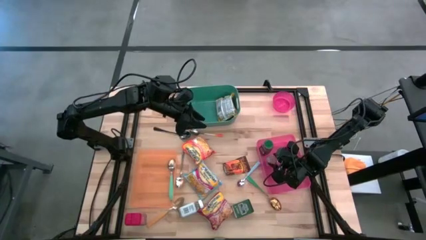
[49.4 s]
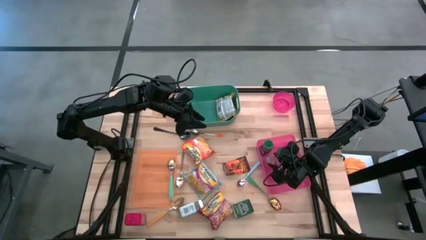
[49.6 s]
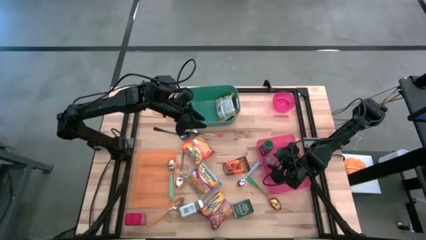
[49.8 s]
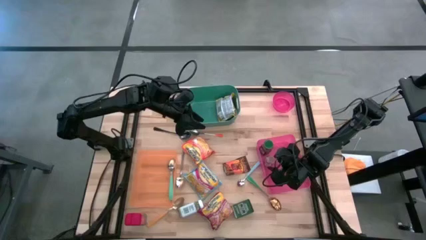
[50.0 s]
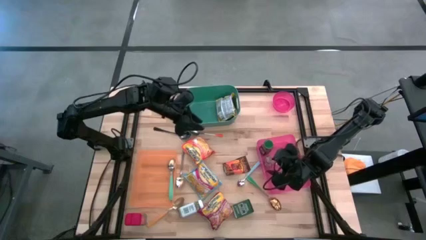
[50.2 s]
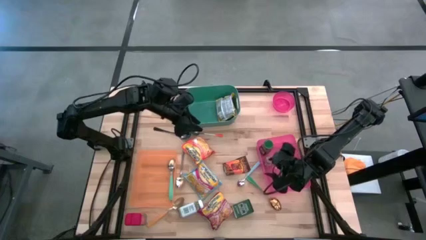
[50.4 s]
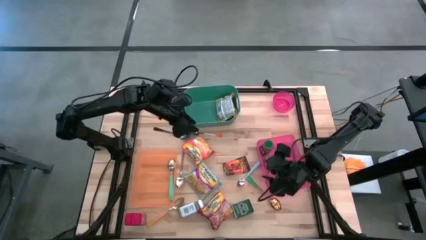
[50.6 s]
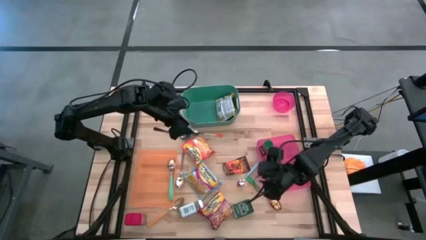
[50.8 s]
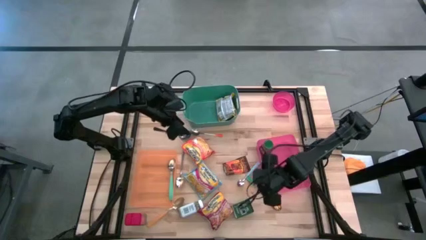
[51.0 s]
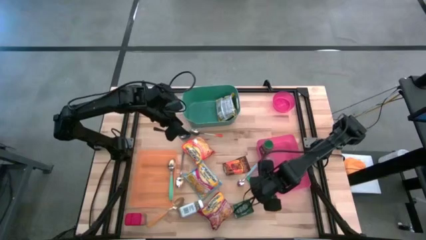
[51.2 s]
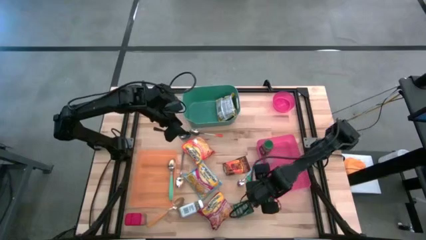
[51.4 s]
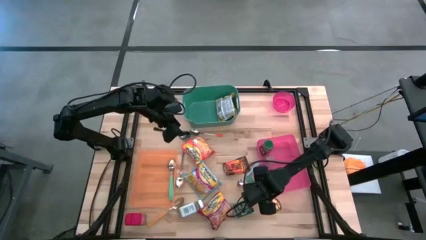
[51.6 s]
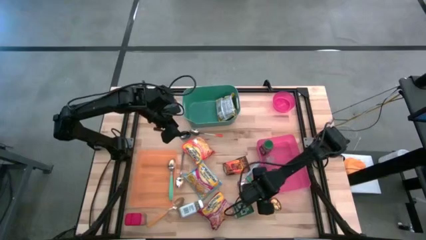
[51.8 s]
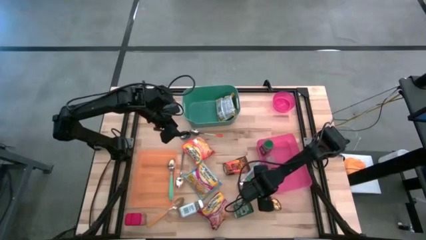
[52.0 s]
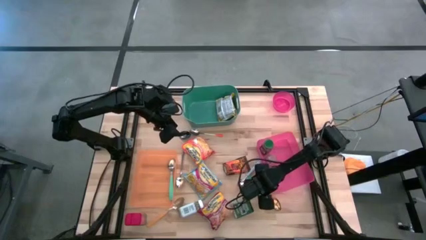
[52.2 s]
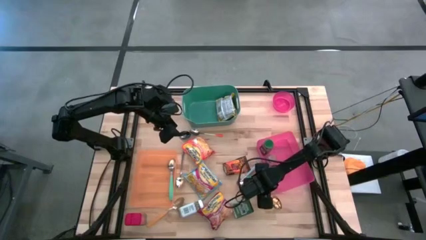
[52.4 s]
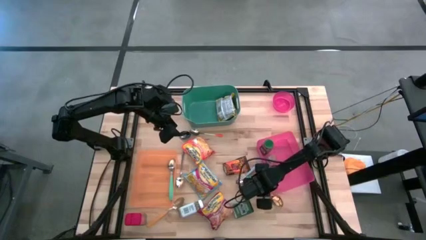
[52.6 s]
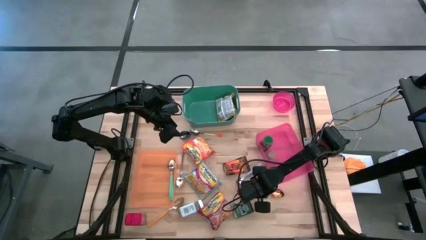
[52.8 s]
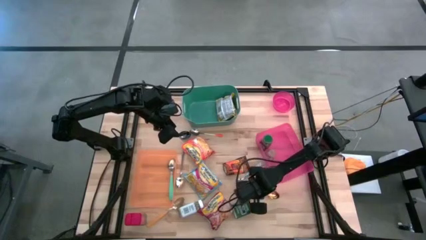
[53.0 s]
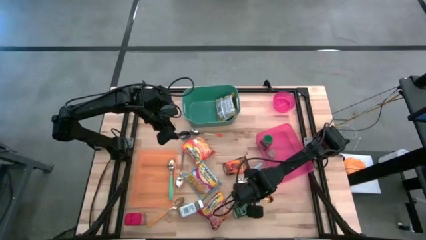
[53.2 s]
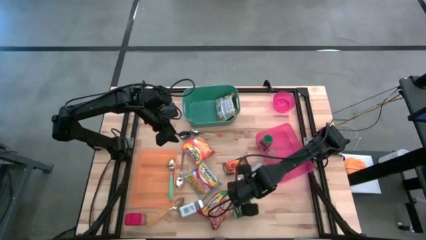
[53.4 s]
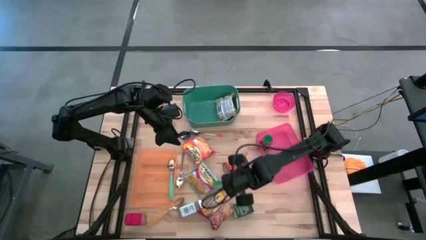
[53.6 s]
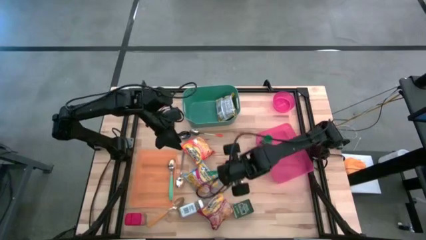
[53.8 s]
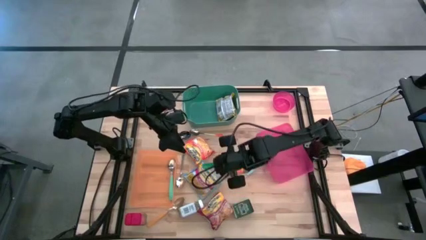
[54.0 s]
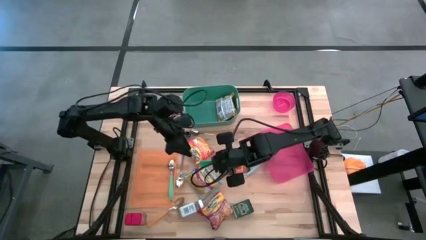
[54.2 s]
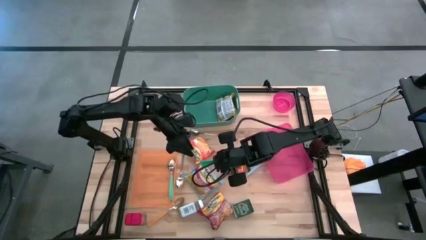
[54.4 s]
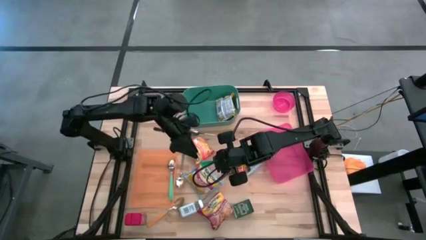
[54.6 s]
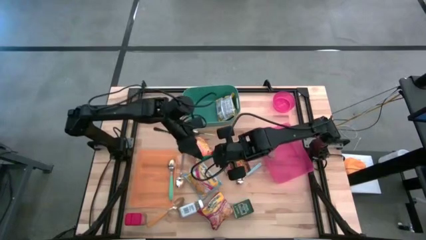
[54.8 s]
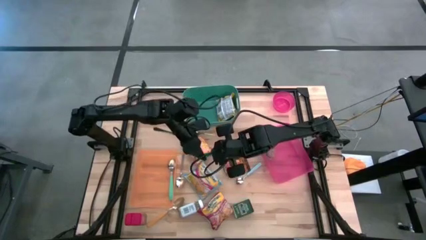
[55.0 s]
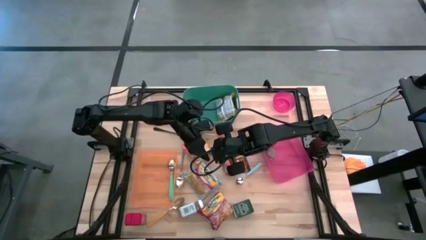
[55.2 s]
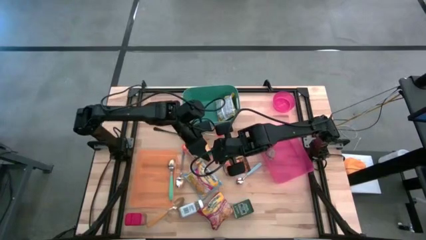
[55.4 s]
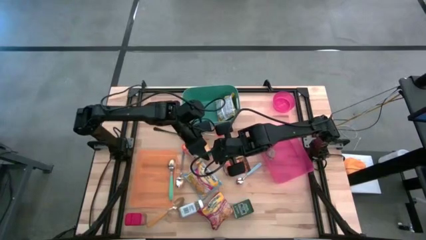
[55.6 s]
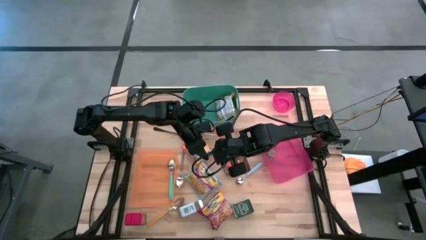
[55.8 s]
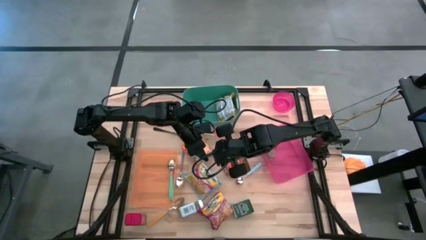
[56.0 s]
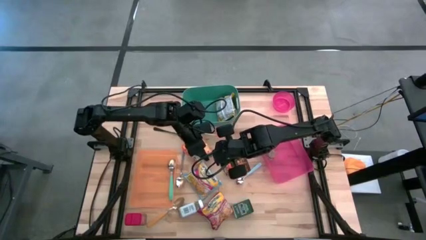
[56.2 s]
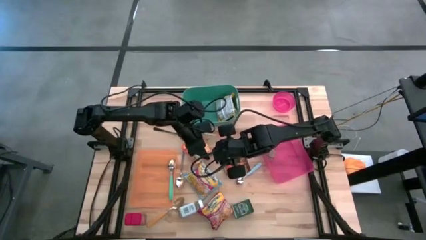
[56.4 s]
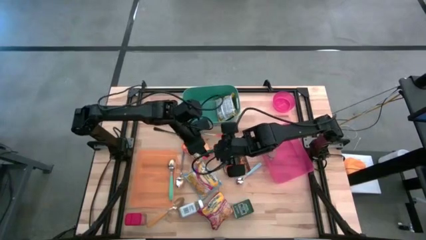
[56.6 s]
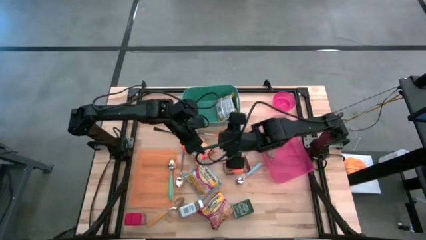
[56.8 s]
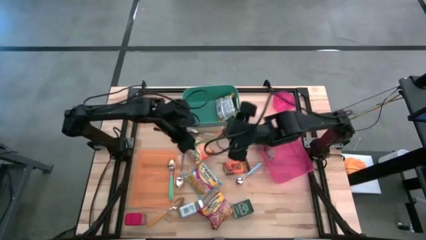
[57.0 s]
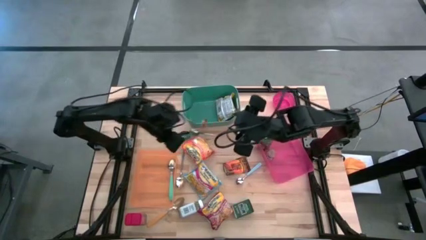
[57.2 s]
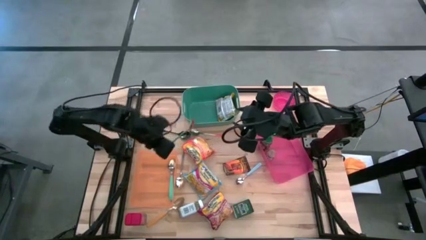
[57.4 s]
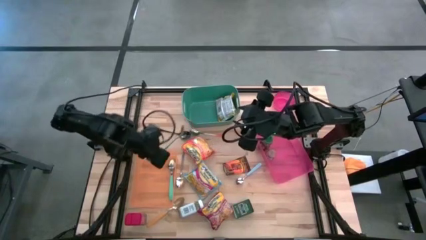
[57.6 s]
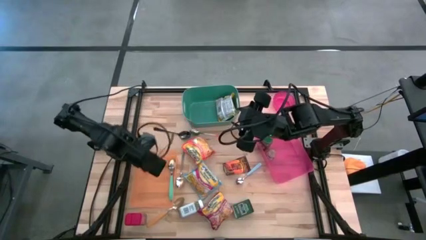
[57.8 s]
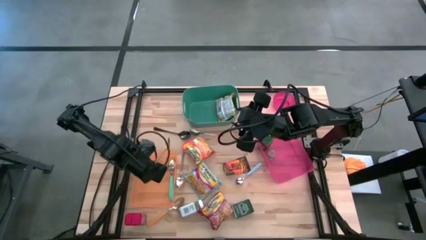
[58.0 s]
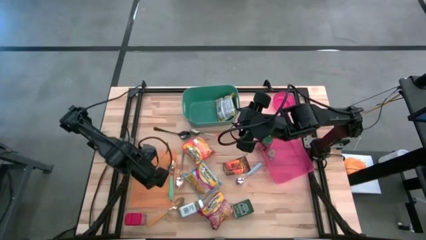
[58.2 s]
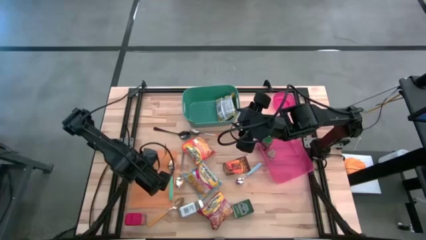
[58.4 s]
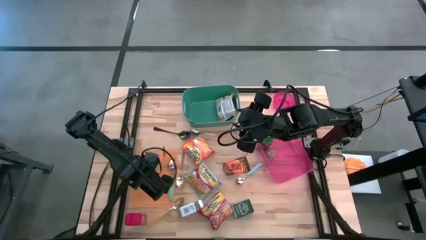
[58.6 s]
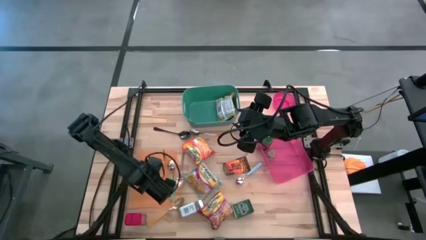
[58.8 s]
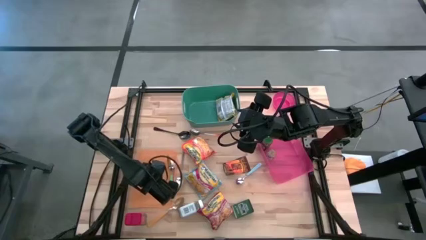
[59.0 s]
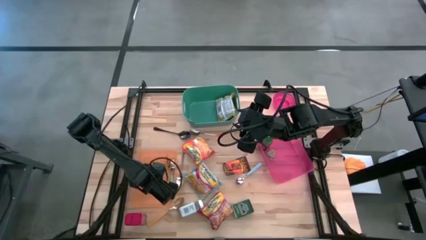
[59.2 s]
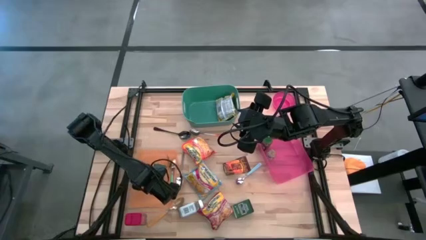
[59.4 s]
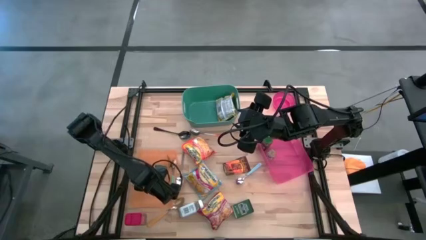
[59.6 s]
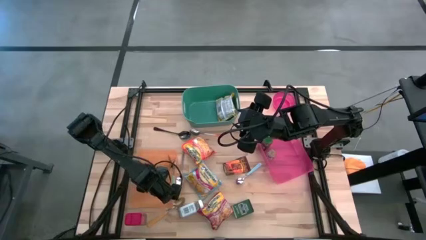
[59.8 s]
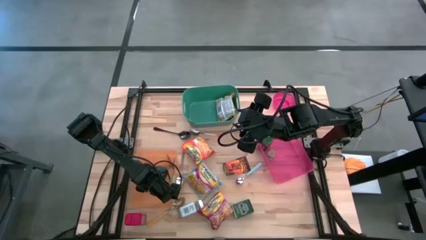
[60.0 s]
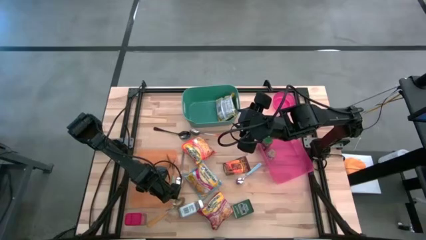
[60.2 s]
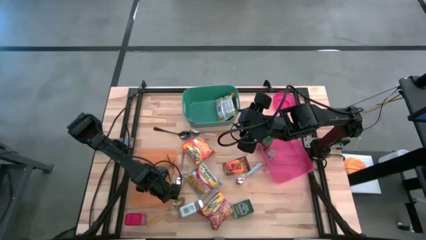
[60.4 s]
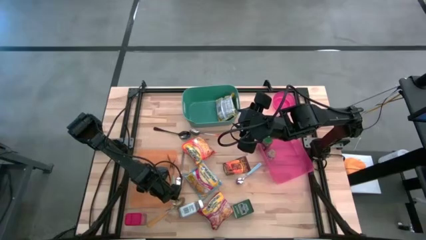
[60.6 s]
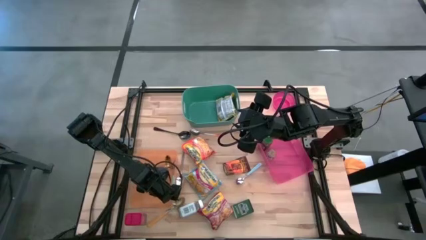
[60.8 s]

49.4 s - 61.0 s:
Put the green spoon into the orange bin

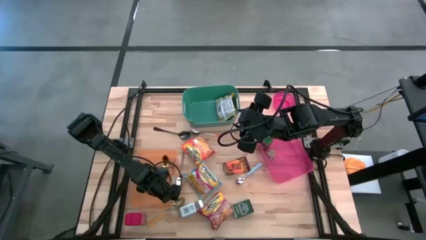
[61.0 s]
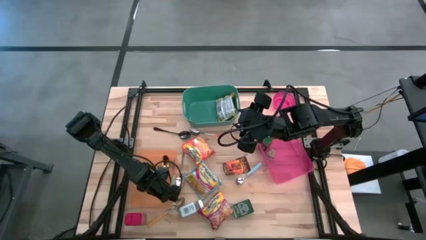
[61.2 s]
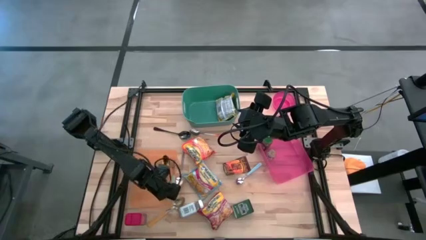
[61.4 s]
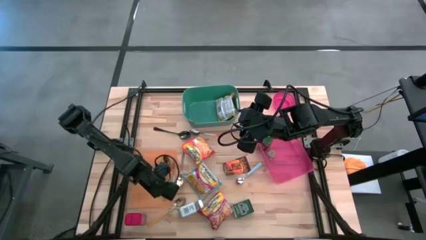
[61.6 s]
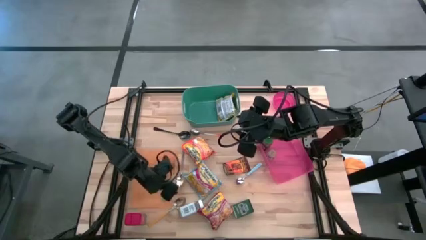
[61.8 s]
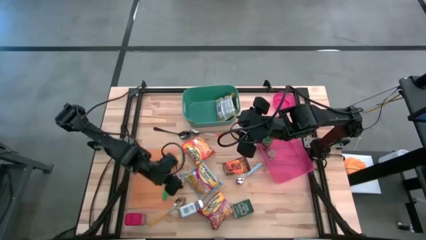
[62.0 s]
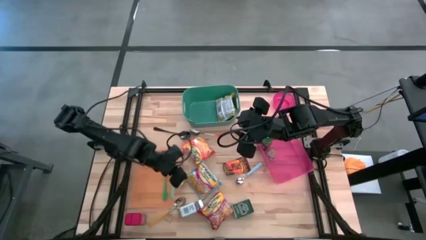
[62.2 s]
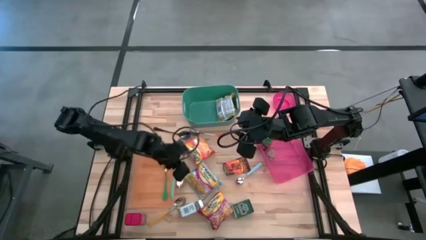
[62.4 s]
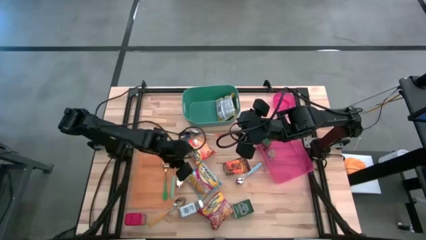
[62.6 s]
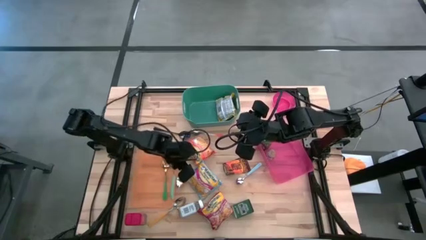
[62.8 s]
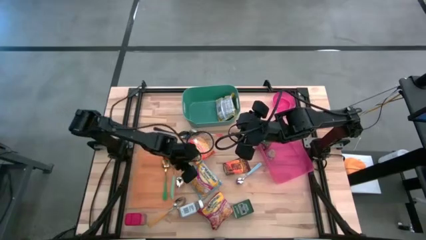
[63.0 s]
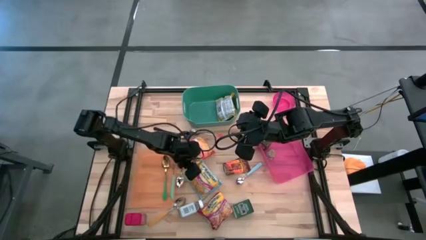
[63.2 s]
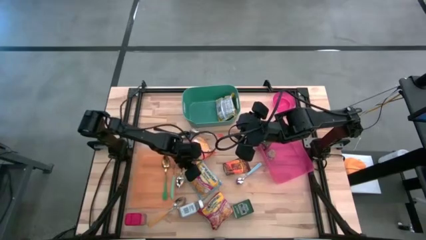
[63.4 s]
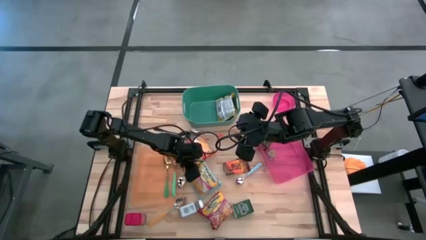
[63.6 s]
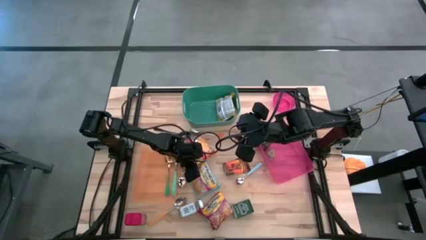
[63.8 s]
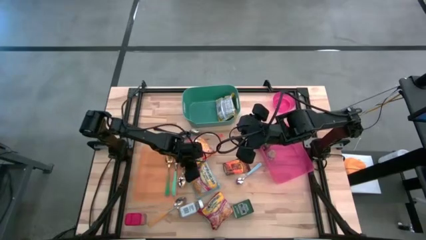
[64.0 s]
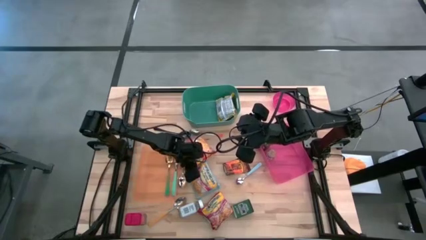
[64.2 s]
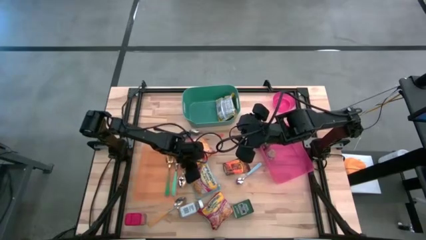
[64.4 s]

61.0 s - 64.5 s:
Put the blue noodle pack into the green bin
